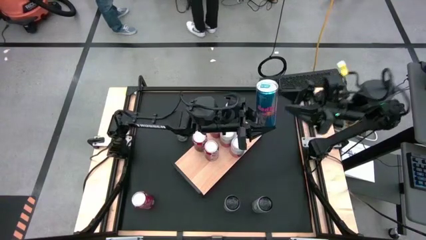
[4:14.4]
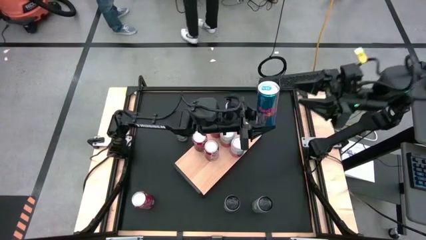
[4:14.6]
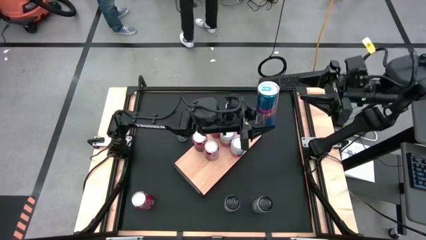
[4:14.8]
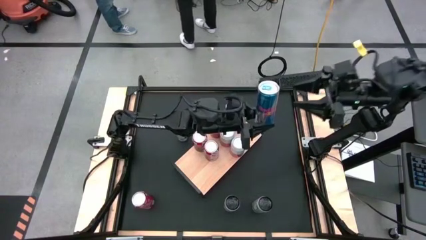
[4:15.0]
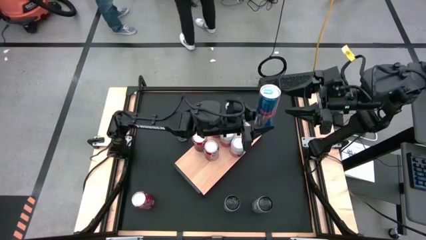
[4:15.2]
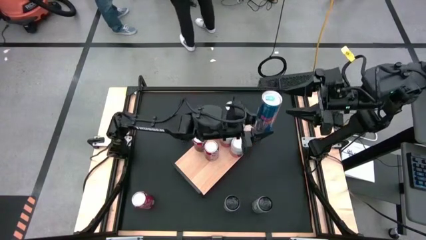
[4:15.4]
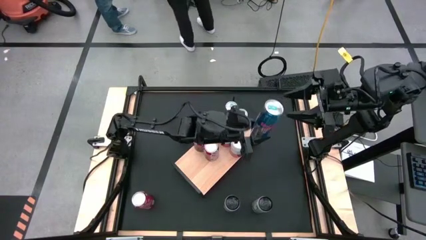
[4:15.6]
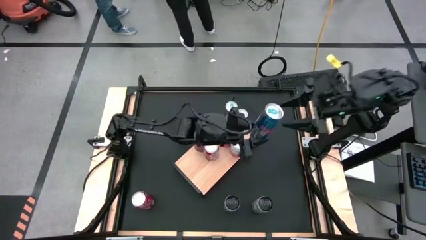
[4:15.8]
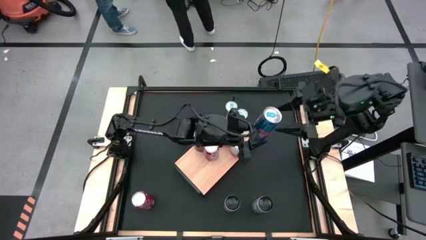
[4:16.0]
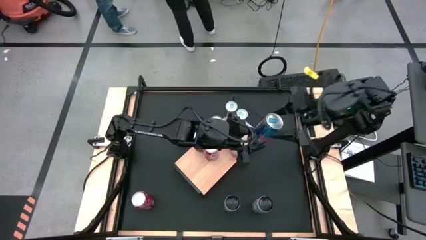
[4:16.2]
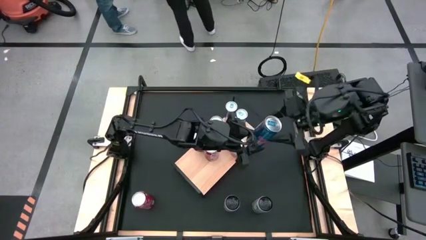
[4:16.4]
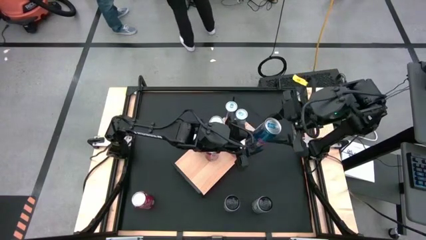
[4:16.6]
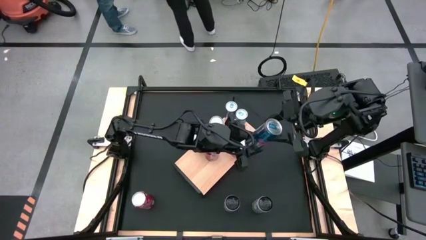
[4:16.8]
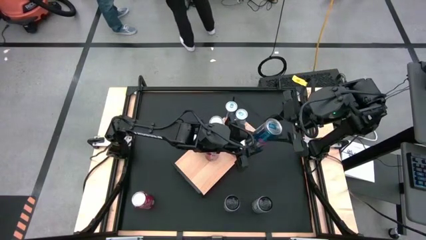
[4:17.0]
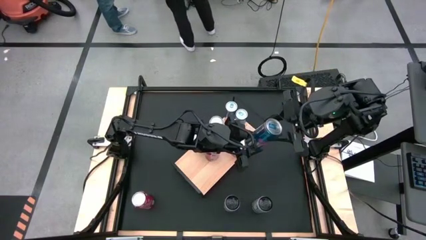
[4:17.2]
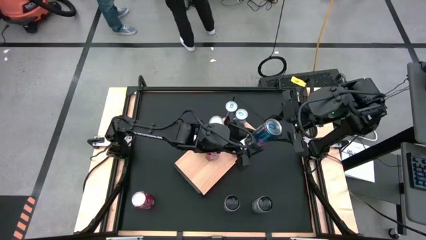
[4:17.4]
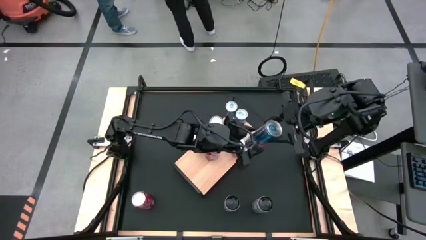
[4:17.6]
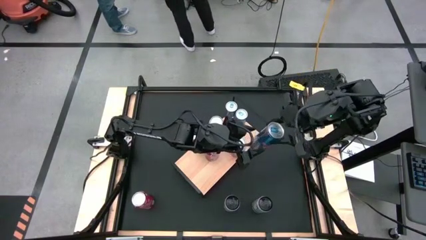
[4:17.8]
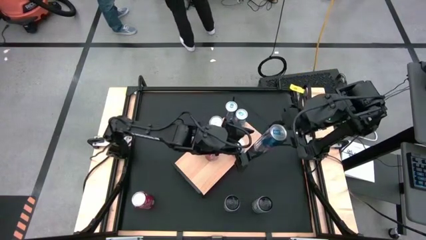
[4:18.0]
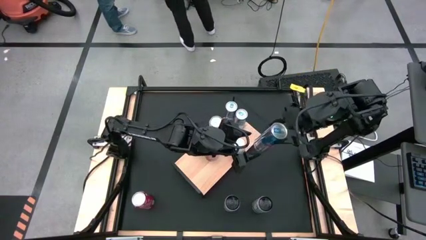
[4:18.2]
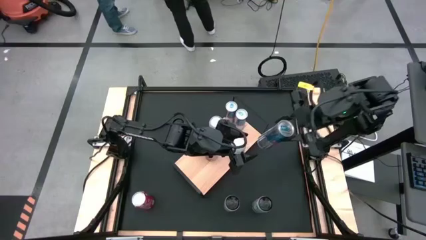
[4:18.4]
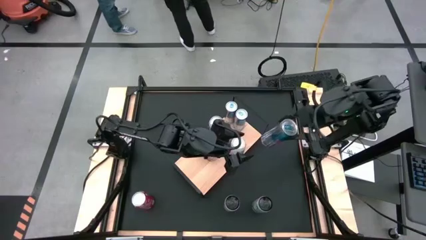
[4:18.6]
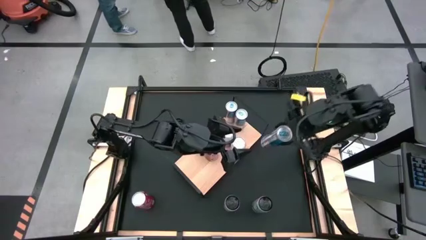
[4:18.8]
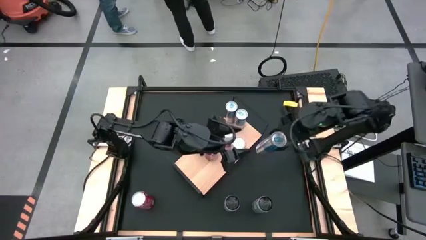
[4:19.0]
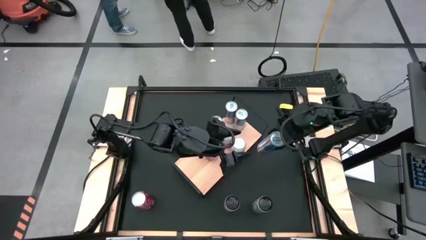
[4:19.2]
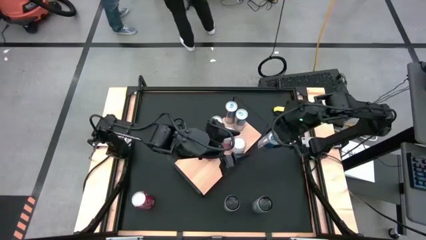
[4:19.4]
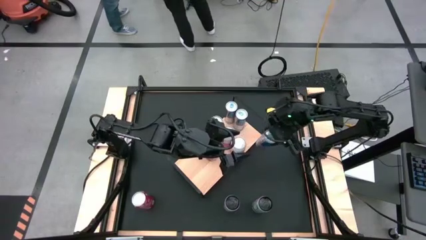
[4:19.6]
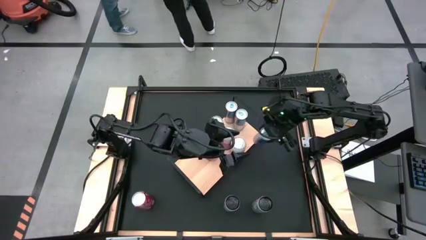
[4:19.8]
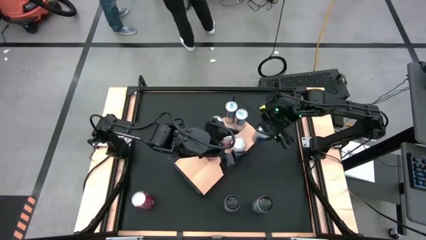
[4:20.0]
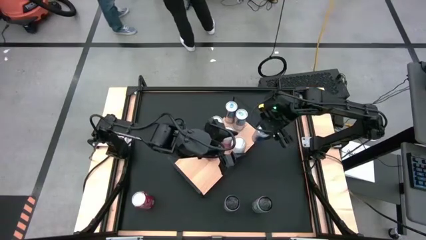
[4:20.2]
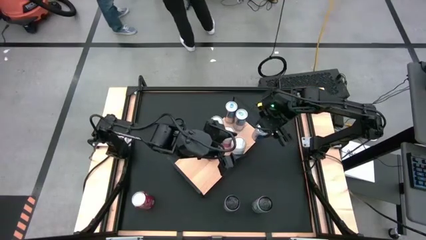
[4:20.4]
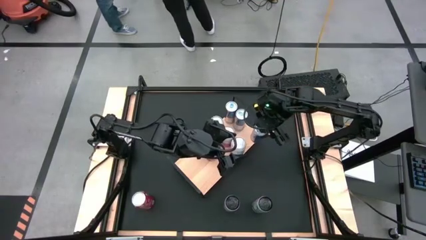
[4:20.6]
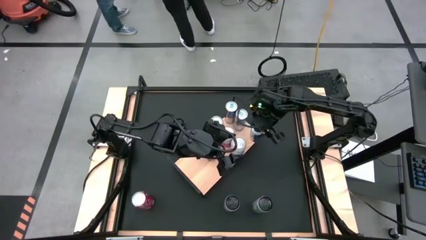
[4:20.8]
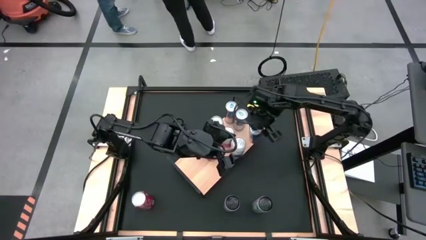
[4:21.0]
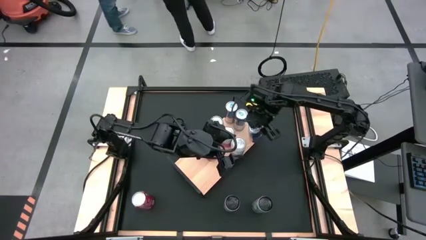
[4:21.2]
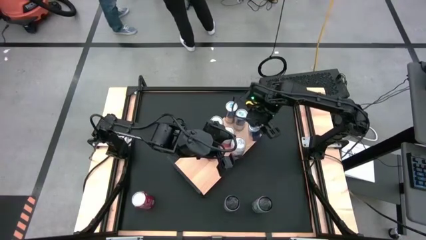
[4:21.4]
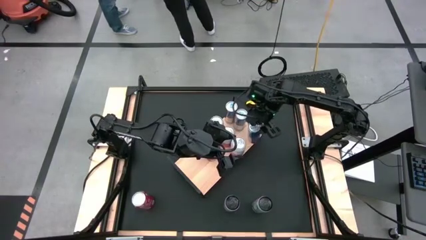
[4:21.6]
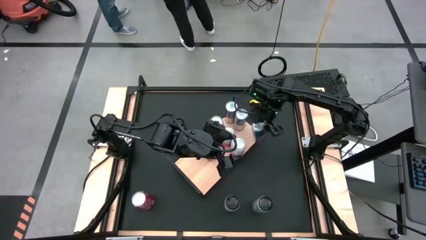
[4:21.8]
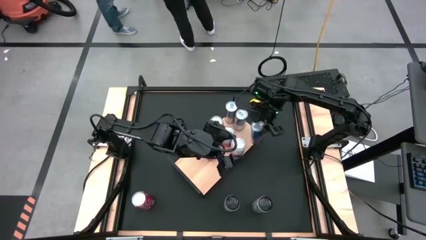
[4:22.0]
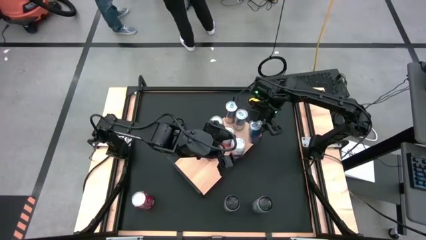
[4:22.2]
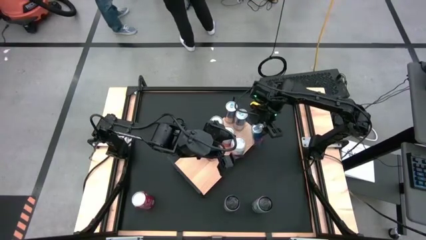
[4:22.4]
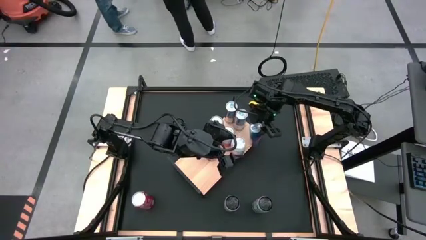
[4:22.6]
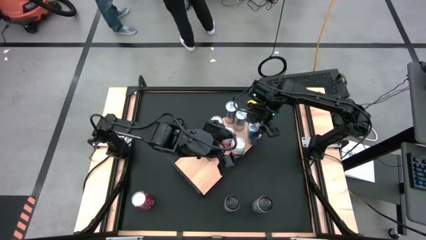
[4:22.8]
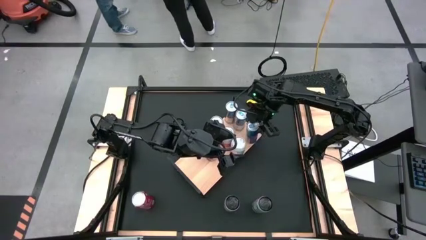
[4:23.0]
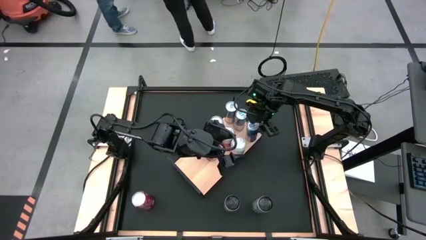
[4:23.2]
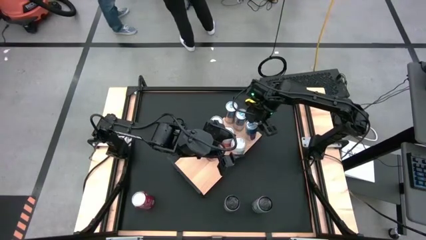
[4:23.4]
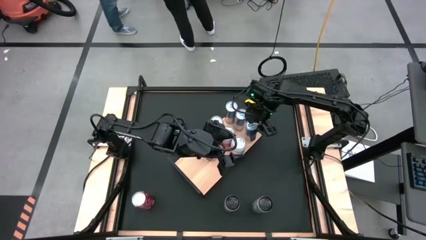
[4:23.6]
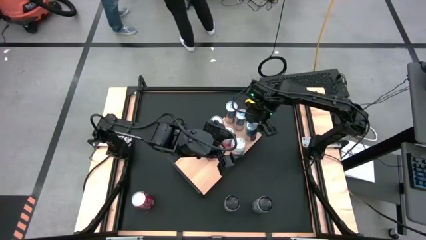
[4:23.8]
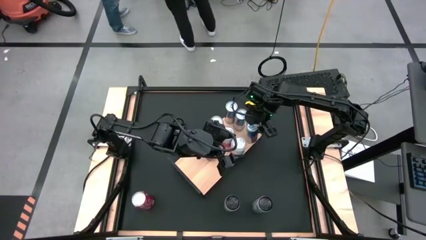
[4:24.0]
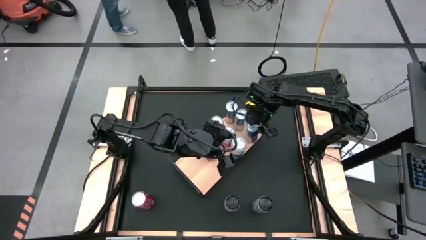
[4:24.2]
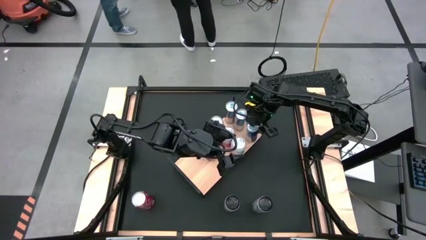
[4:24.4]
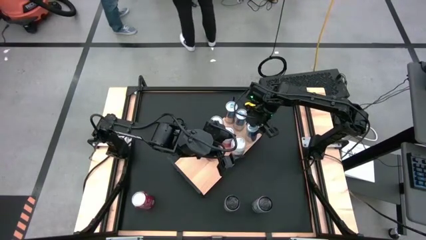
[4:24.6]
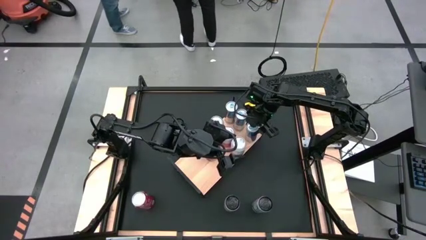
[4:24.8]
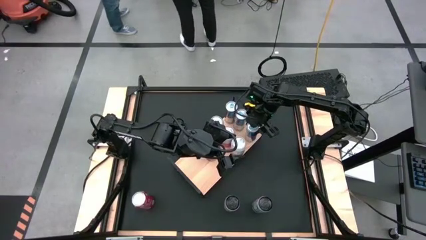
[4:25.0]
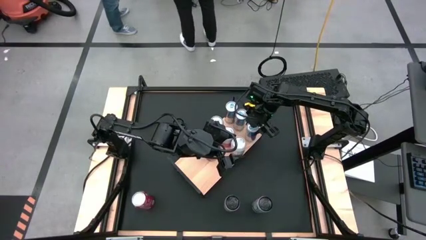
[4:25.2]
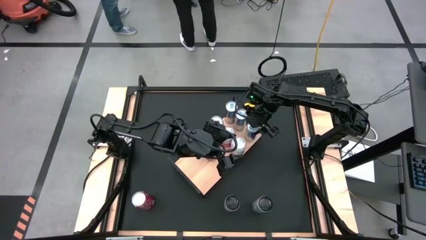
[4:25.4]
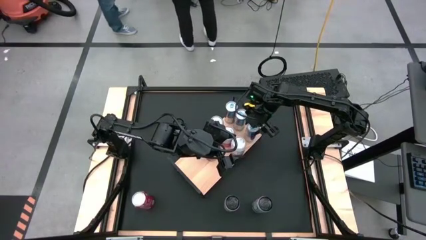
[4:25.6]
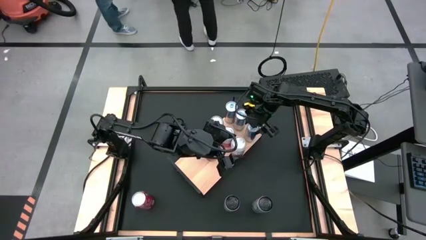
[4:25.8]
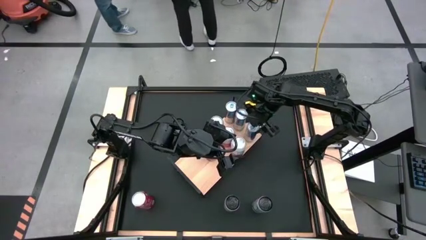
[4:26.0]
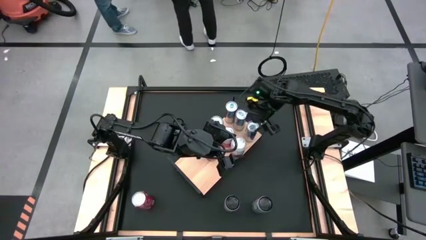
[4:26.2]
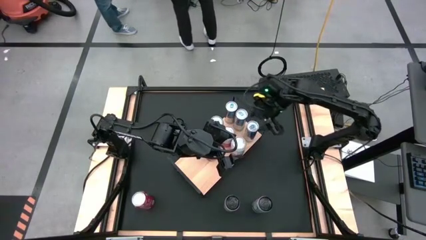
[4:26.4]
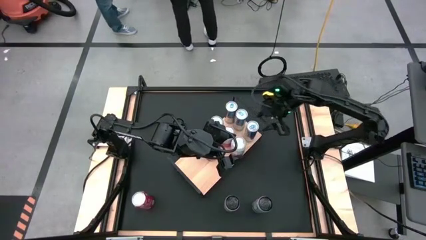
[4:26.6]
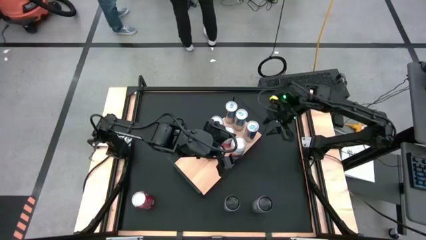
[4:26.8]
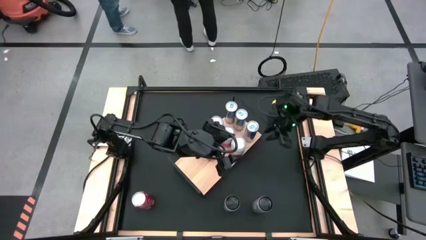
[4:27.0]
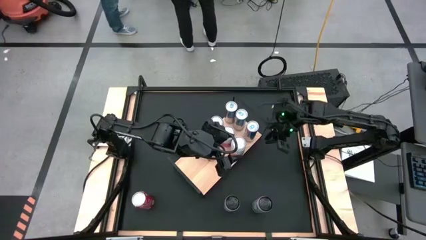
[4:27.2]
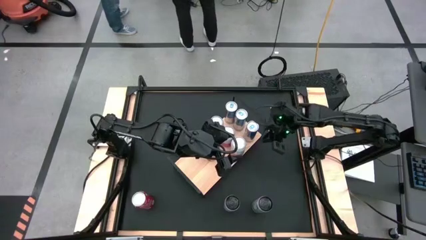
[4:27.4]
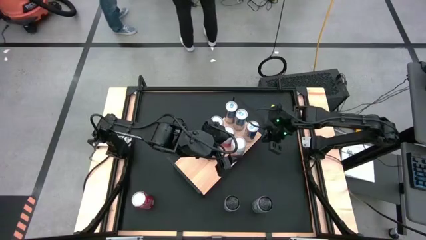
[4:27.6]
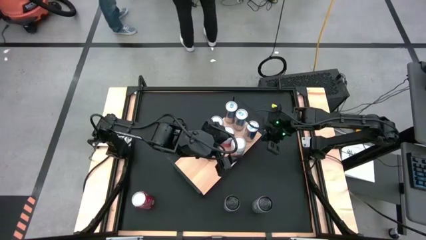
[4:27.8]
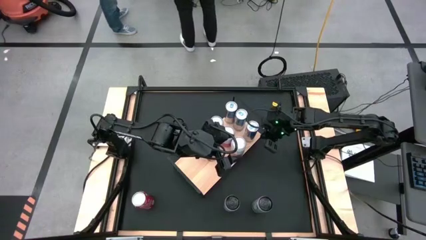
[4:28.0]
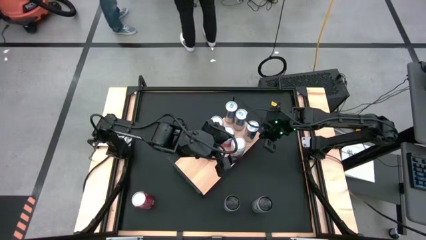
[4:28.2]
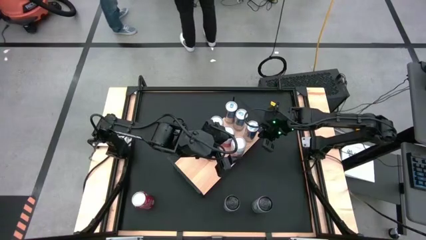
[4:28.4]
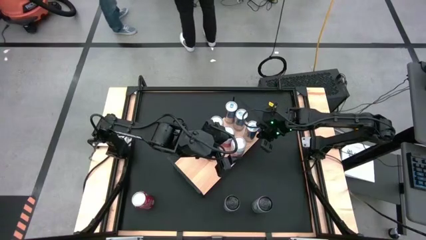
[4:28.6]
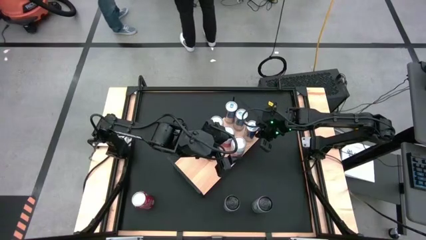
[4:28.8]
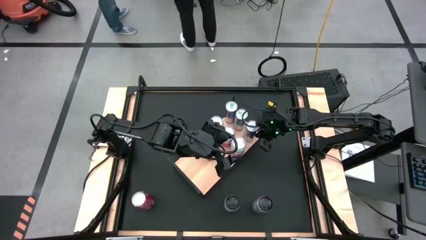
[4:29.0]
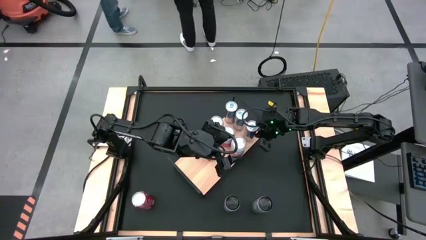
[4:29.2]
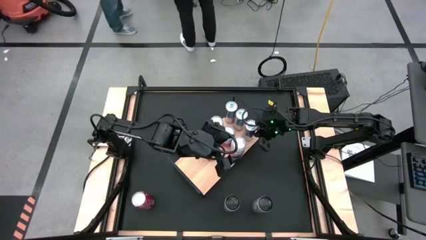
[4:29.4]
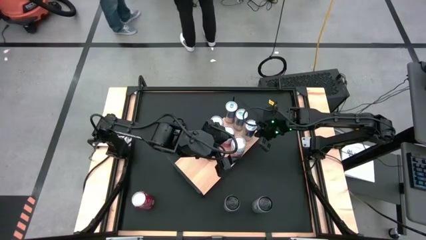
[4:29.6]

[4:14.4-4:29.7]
Task: Place canned beverage on shelf
Put the blue soda can on the shelf aligned with the other blue soda cans
